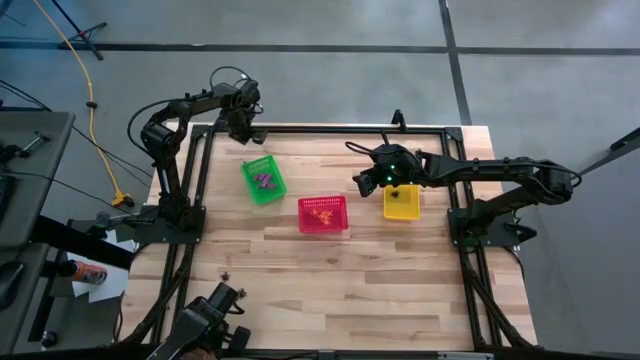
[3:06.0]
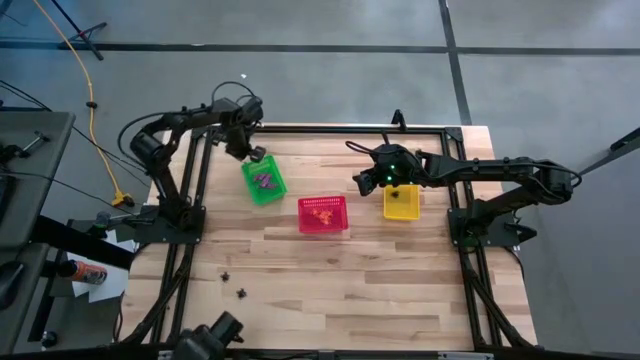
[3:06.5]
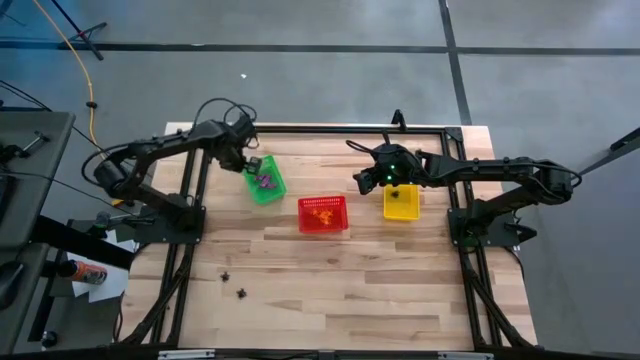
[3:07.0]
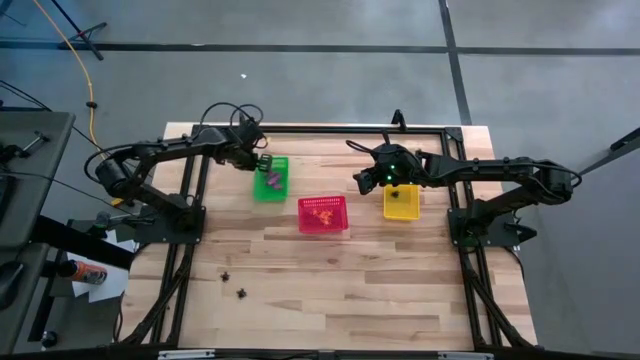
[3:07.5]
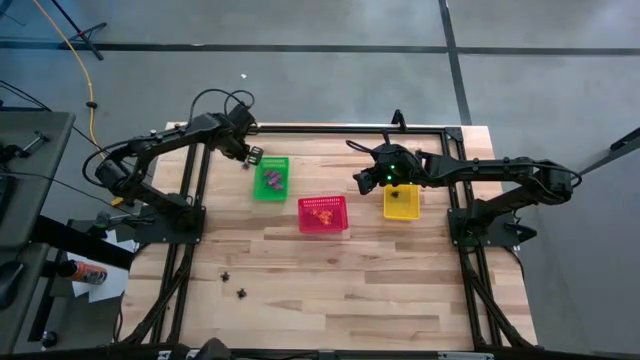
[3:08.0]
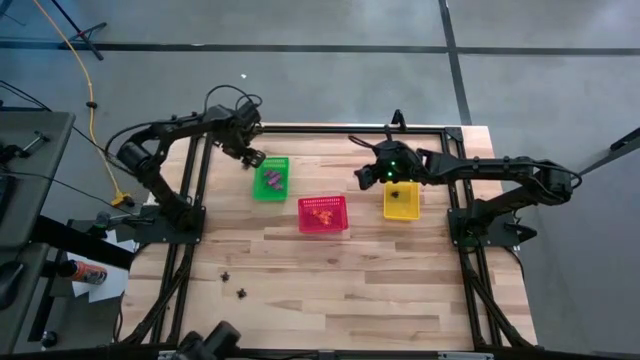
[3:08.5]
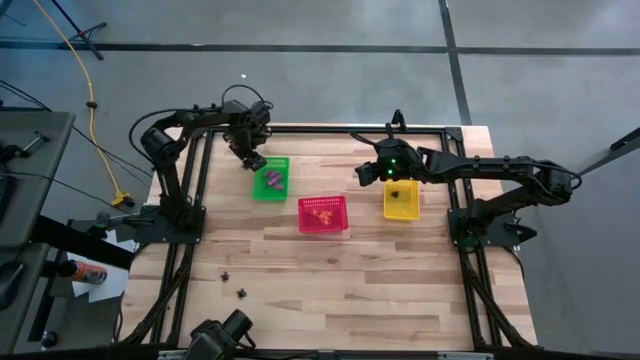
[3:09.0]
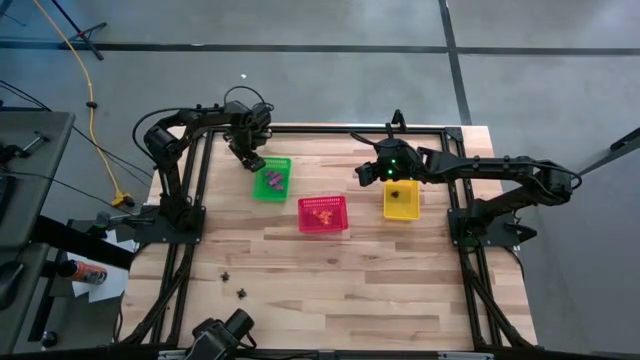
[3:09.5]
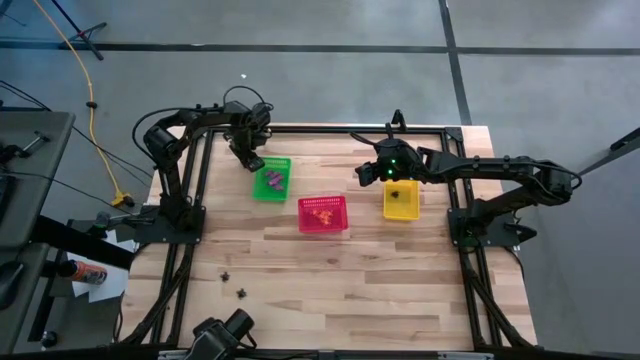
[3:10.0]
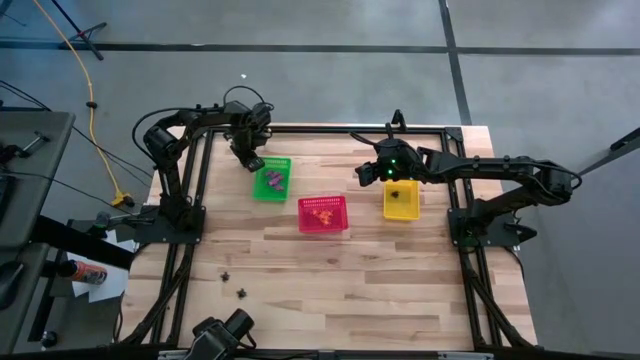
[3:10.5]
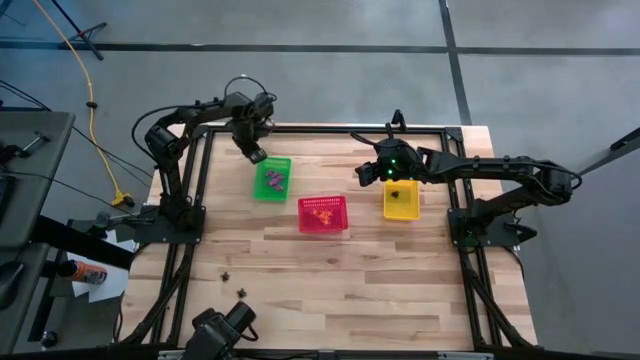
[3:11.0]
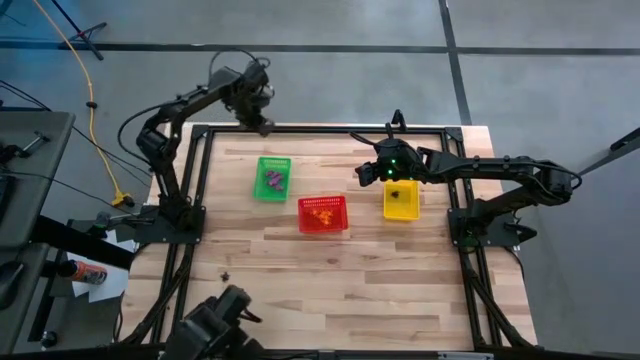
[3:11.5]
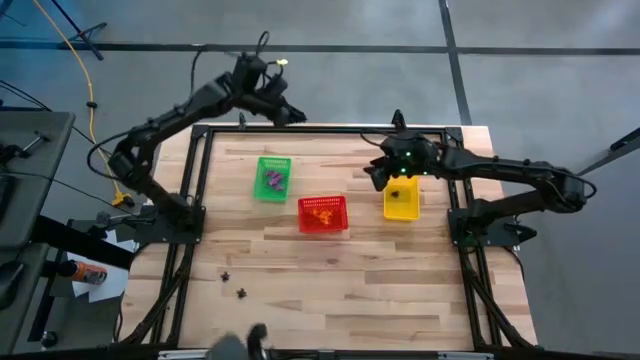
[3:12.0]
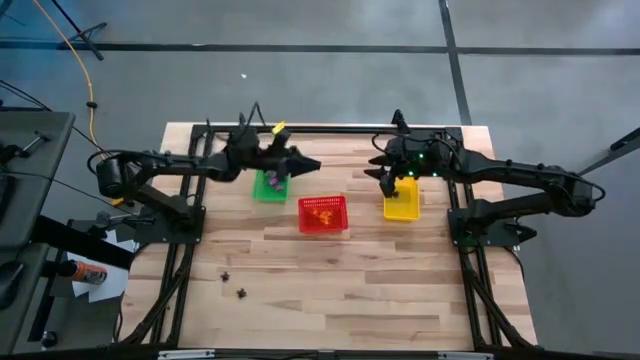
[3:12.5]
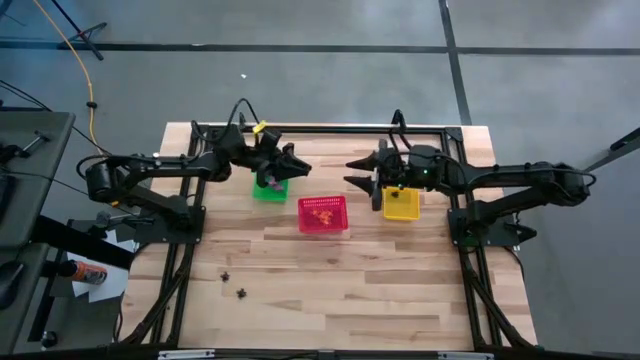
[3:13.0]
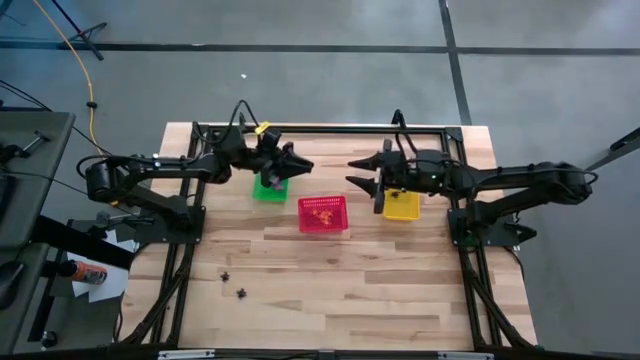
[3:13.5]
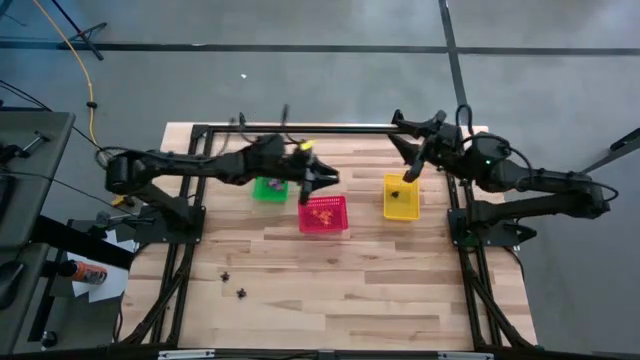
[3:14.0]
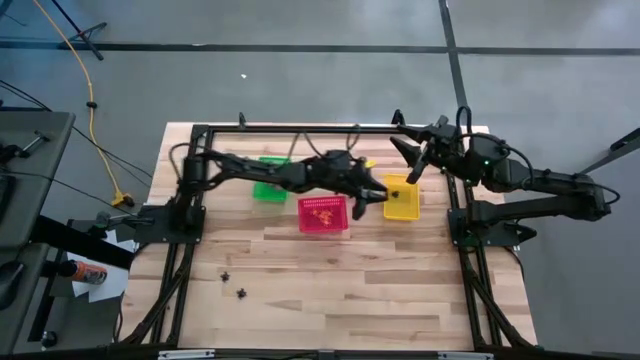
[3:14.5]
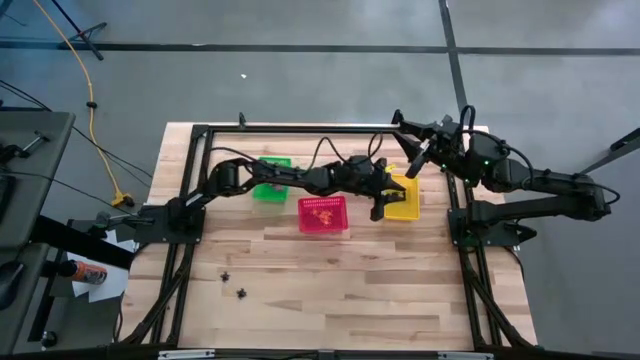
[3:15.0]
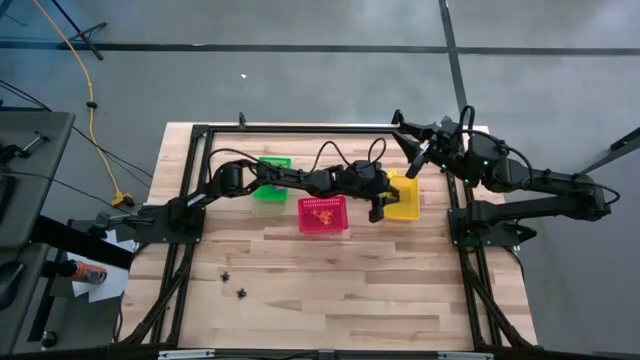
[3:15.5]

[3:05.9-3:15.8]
Task: Sort Halloween decoration
Put the black spider toy into the yellow bin

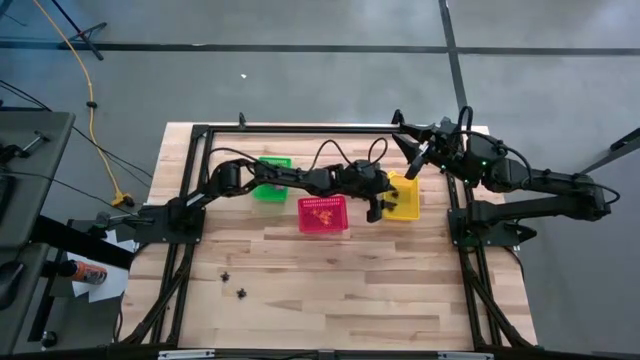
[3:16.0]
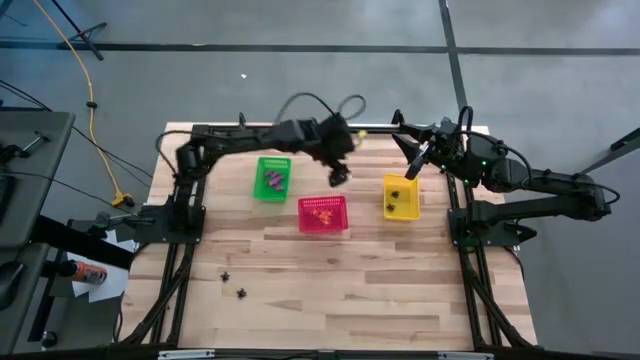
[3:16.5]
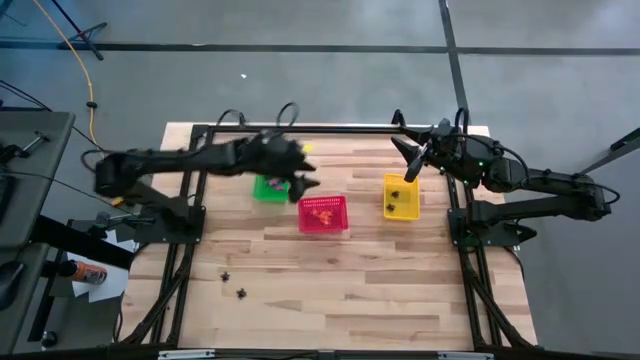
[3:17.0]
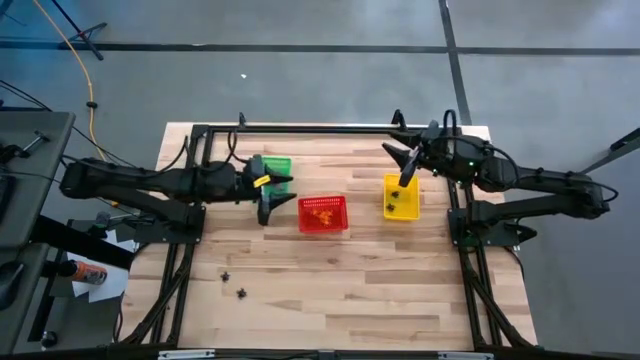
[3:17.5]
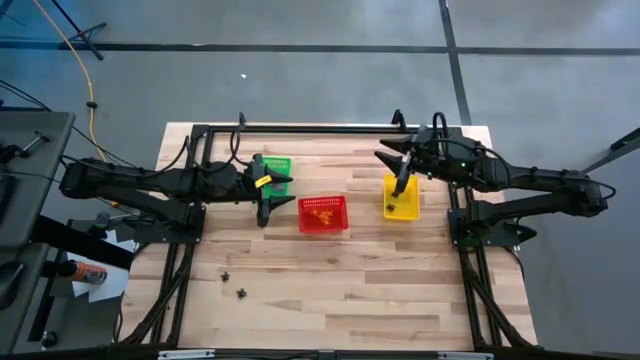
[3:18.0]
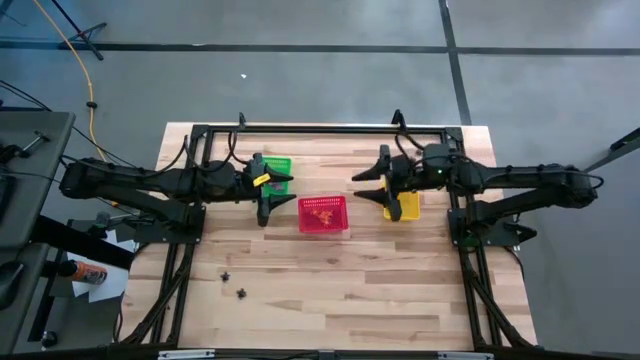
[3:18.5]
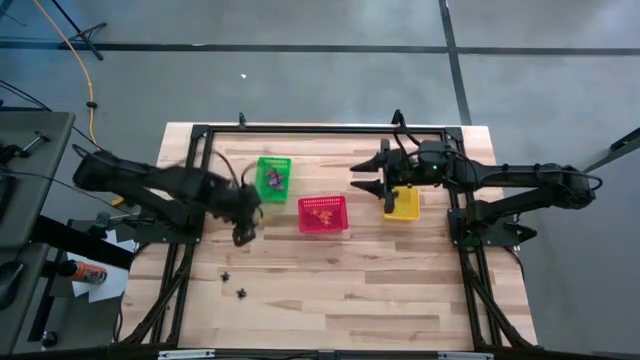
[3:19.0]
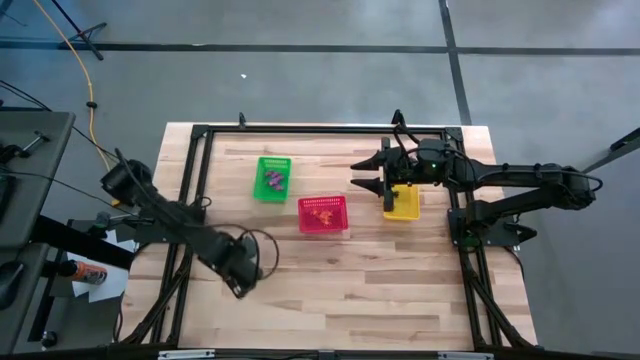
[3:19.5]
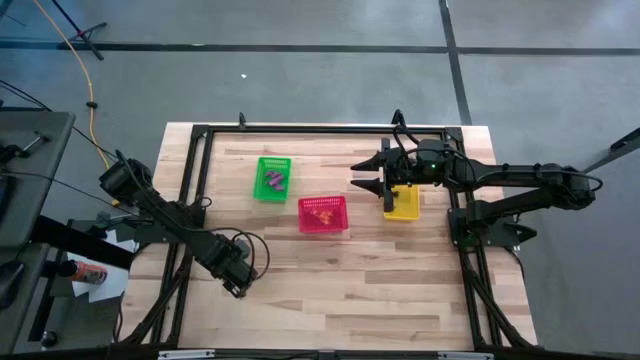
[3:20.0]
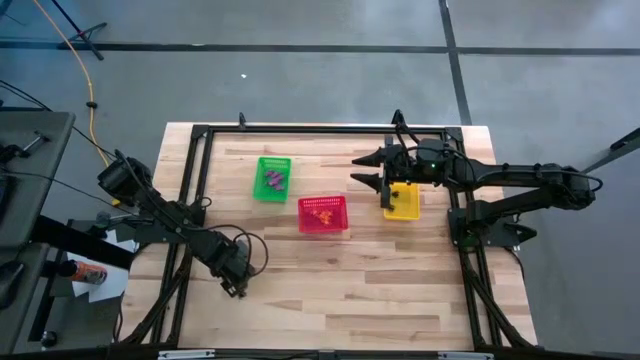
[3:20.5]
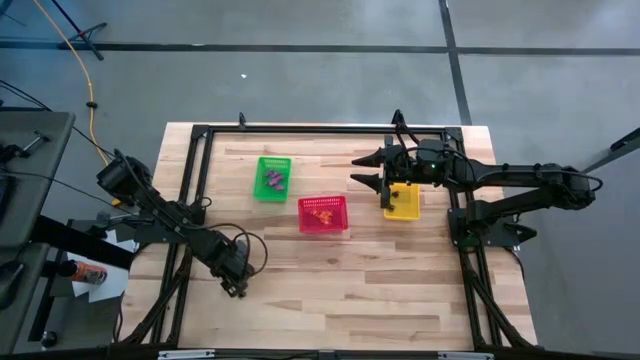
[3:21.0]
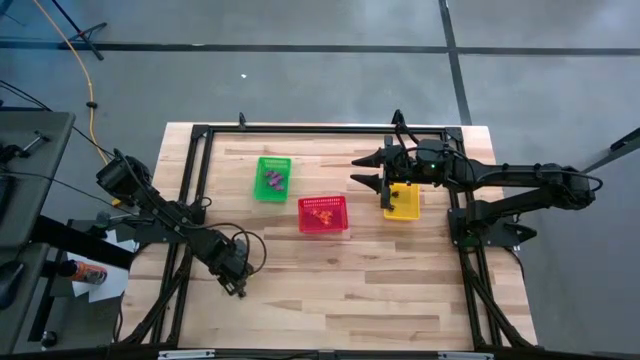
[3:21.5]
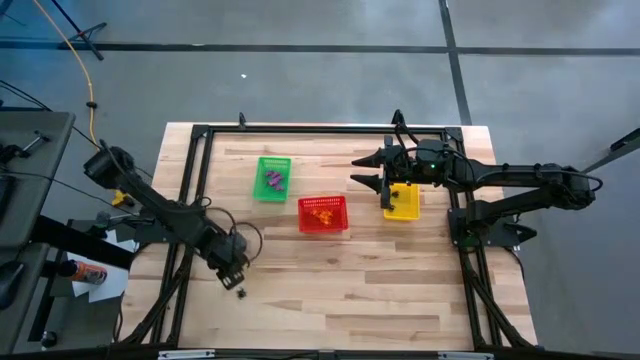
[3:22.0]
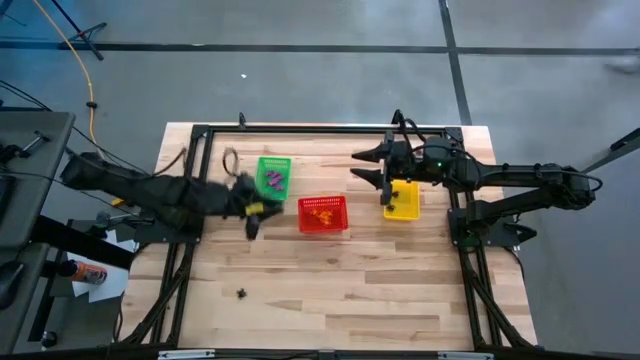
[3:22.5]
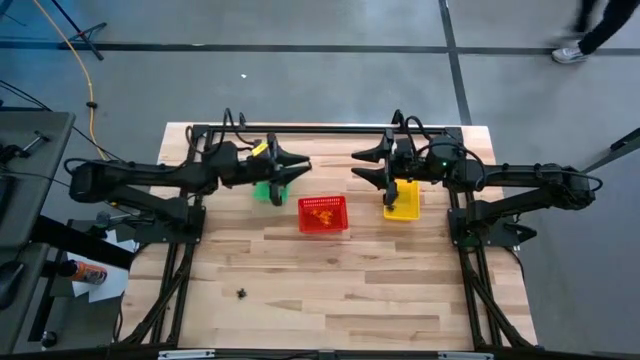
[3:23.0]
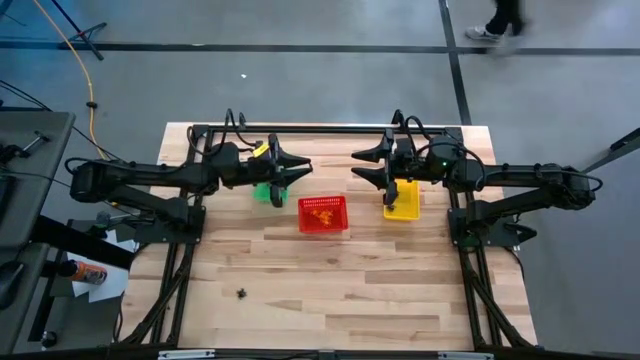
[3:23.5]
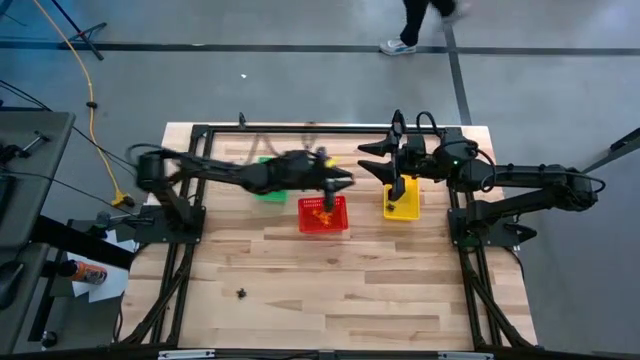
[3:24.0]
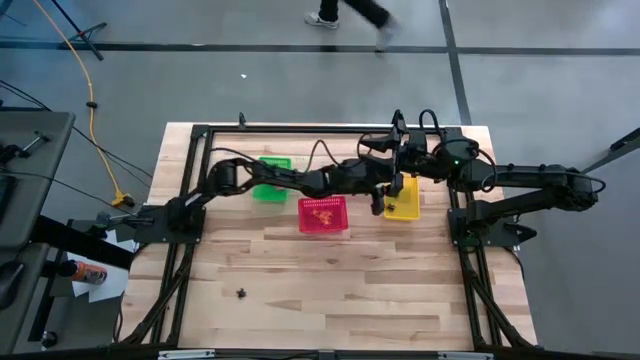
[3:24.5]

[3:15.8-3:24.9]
Put the black spider toy into the yellow bin

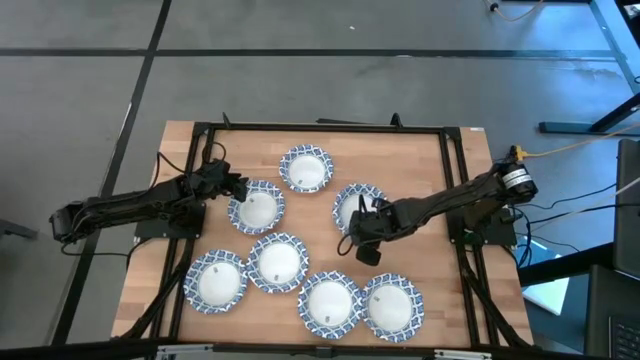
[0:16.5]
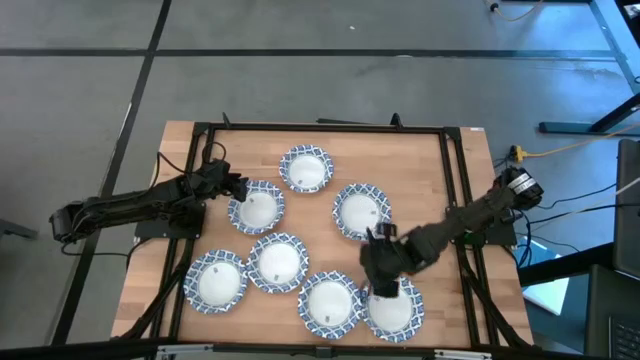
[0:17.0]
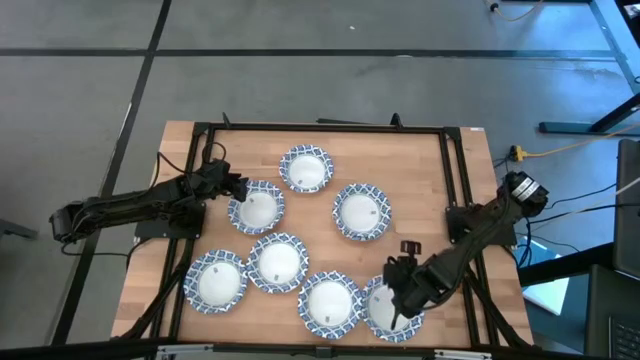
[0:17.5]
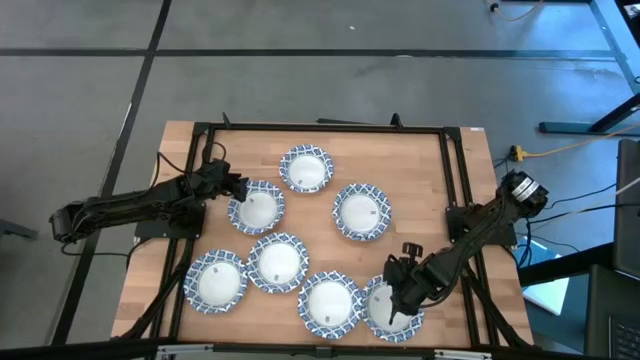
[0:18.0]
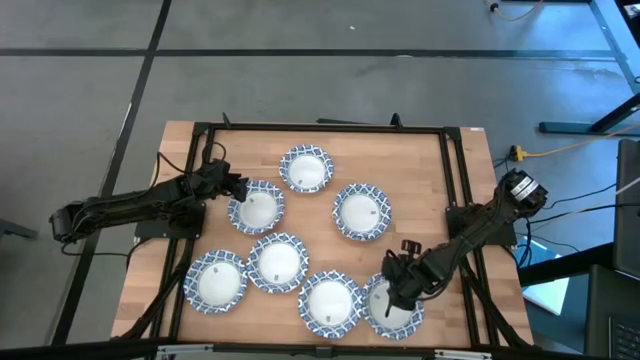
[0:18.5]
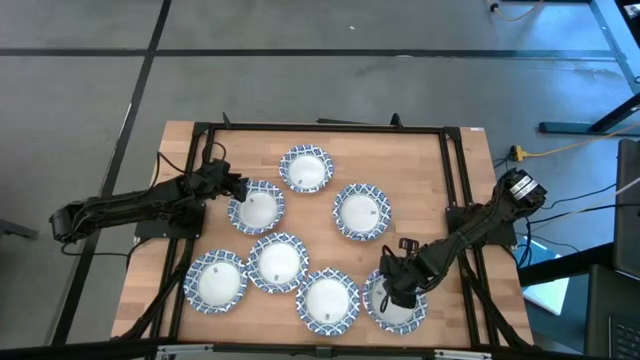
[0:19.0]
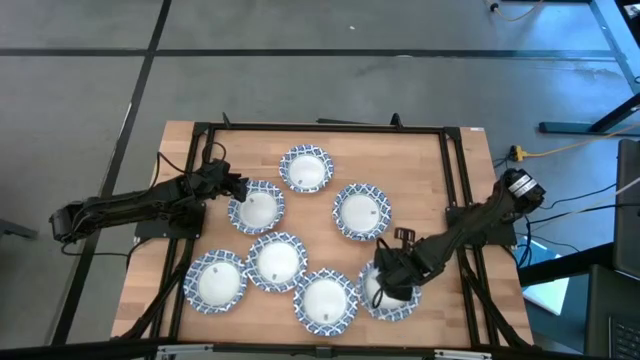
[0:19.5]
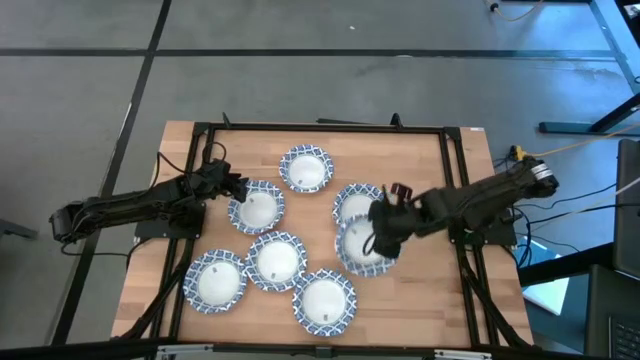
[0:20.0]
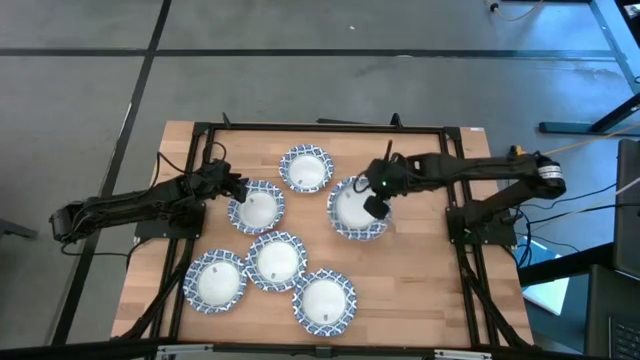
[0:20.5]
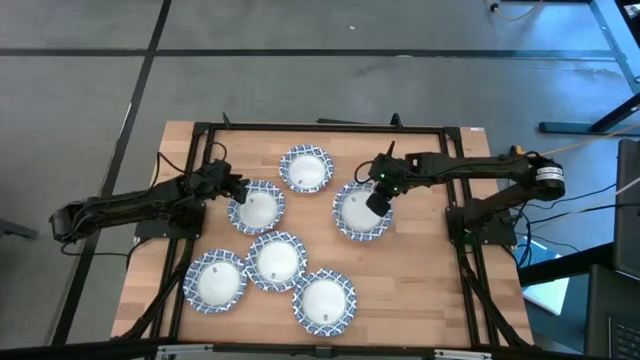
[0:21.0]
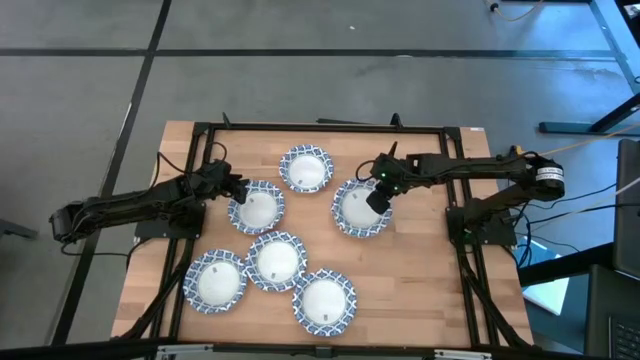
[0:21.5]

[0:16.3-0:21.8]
Task: Nest bowls inside each other
Stack the white patterned bowl on the white patterned bowl
